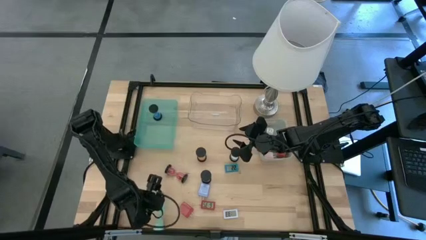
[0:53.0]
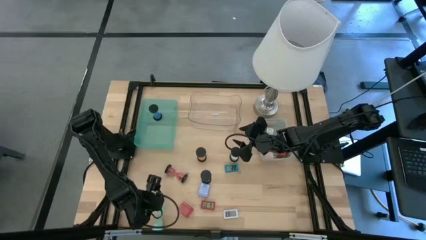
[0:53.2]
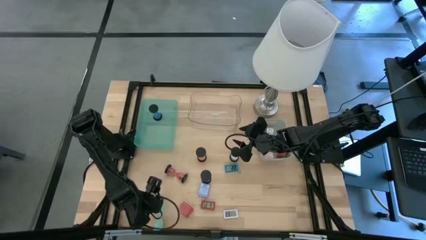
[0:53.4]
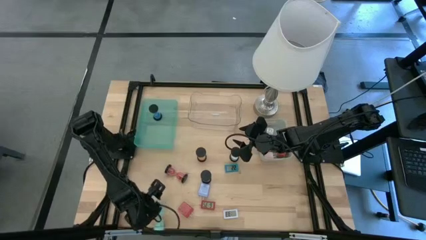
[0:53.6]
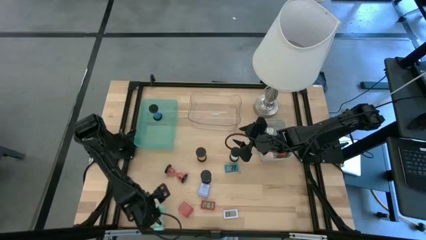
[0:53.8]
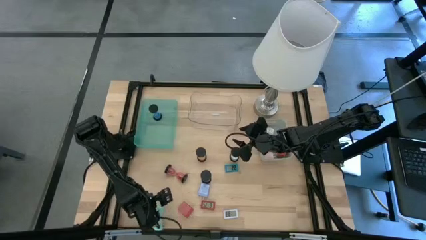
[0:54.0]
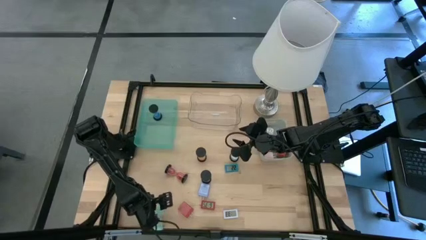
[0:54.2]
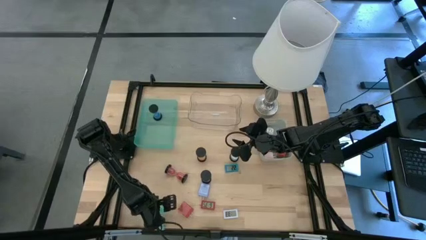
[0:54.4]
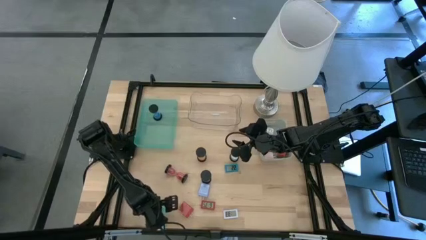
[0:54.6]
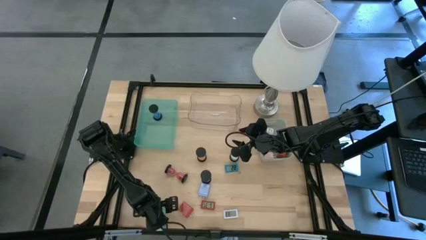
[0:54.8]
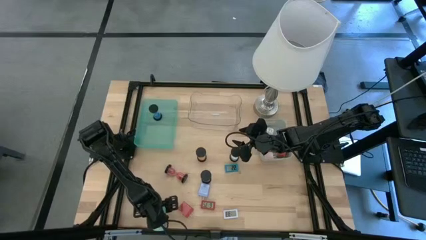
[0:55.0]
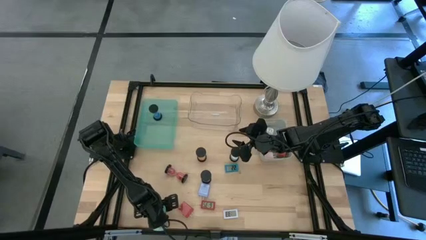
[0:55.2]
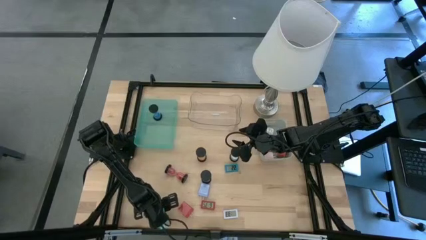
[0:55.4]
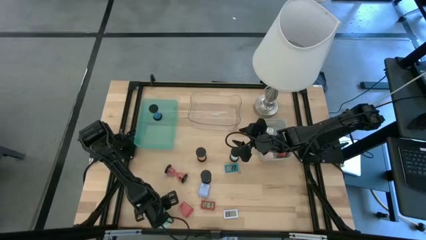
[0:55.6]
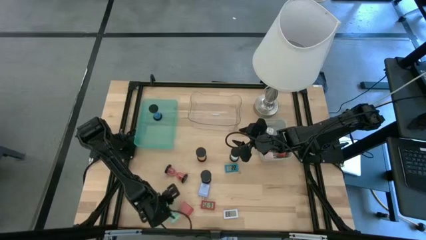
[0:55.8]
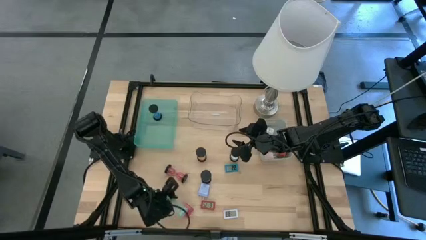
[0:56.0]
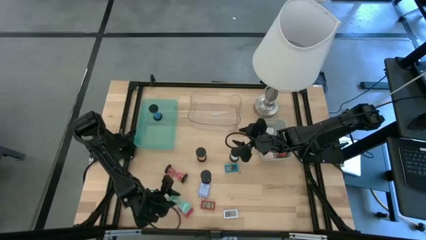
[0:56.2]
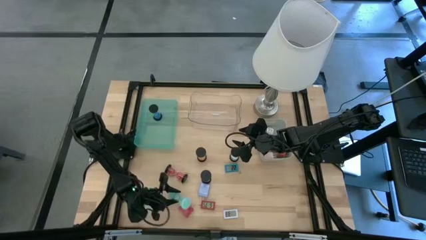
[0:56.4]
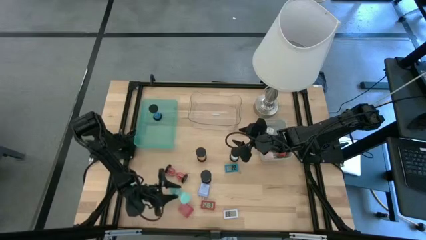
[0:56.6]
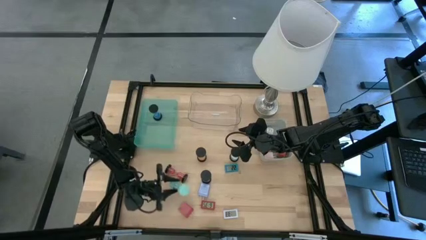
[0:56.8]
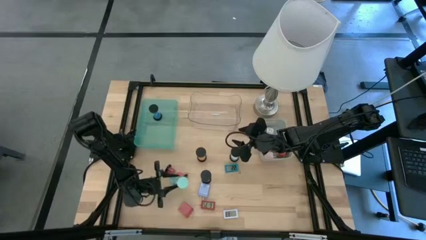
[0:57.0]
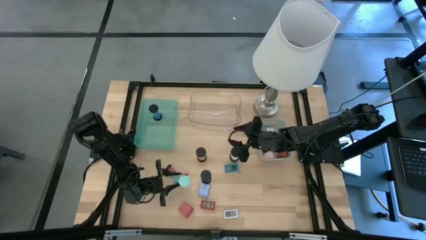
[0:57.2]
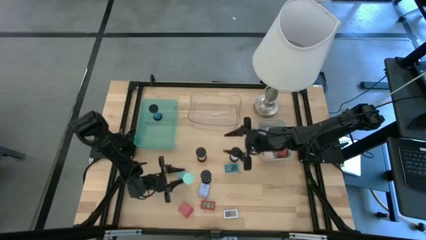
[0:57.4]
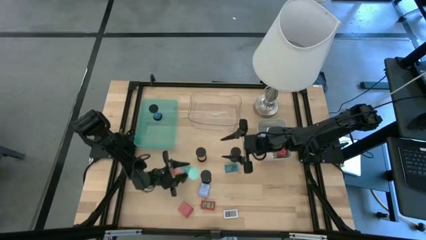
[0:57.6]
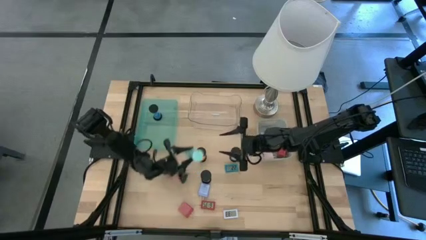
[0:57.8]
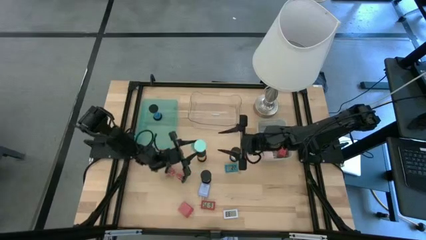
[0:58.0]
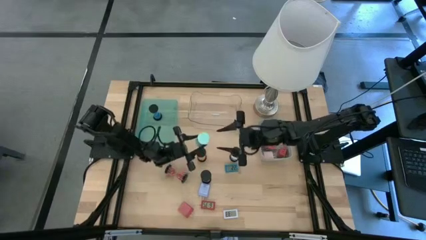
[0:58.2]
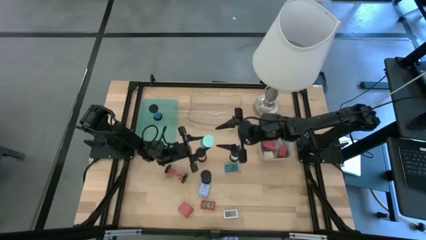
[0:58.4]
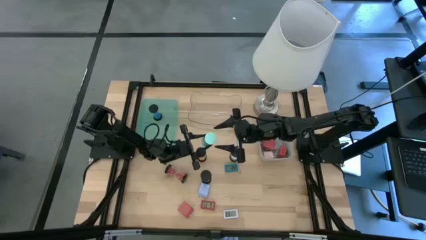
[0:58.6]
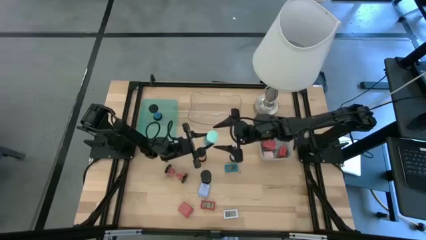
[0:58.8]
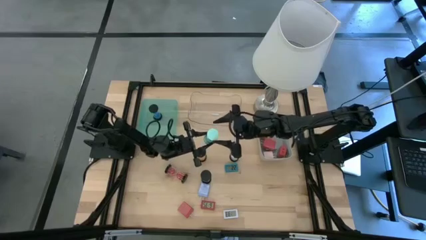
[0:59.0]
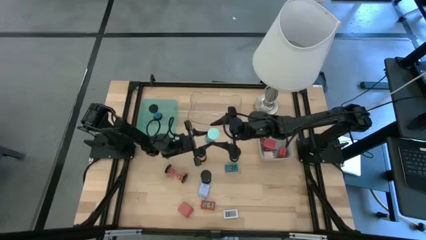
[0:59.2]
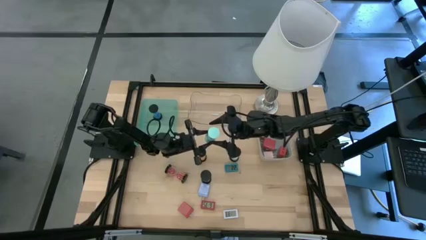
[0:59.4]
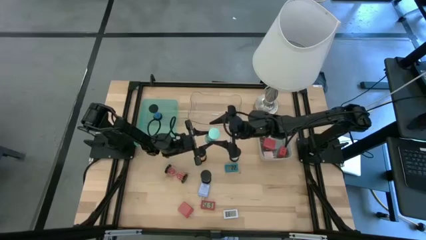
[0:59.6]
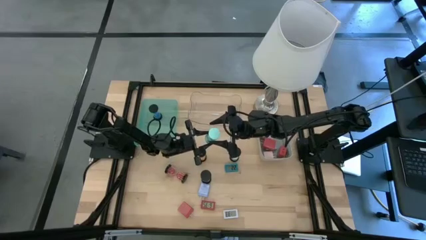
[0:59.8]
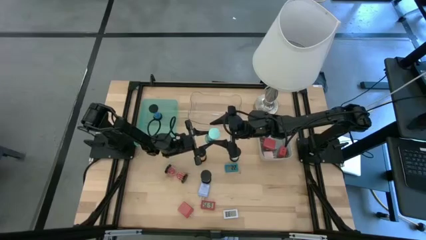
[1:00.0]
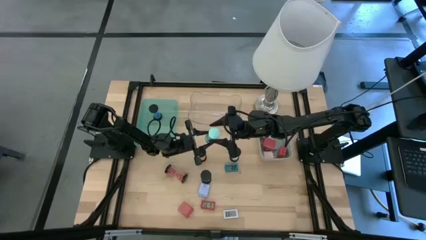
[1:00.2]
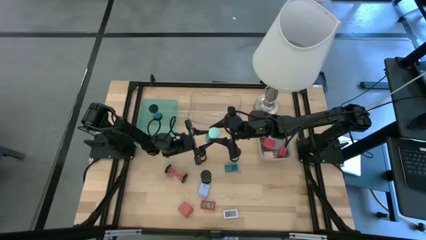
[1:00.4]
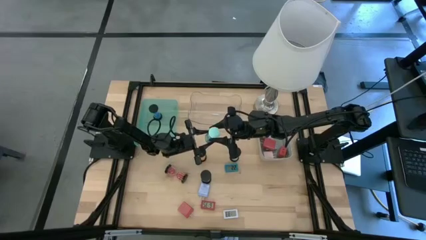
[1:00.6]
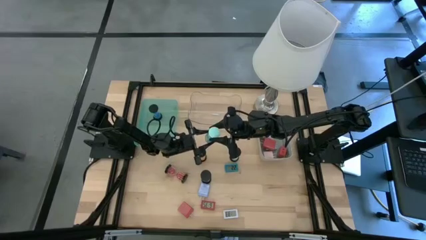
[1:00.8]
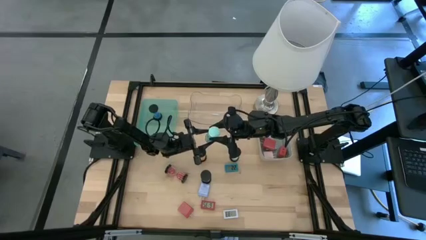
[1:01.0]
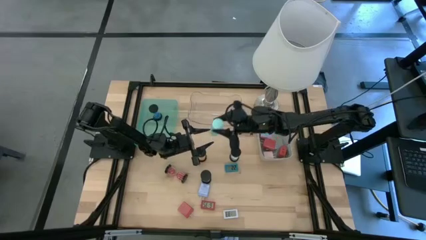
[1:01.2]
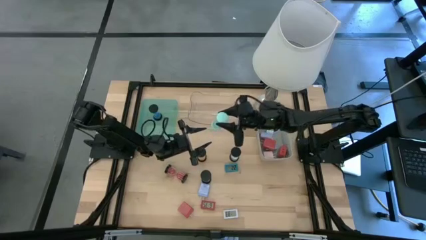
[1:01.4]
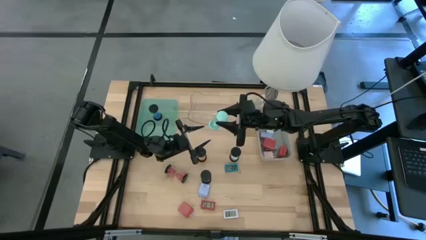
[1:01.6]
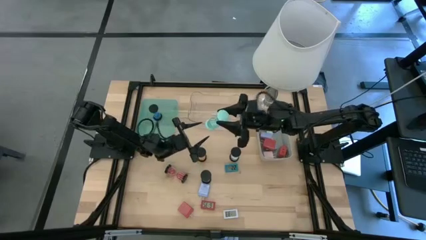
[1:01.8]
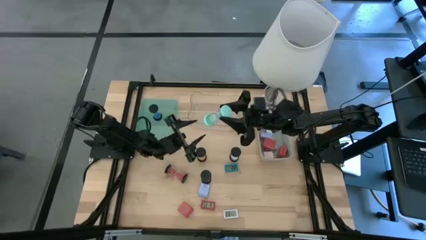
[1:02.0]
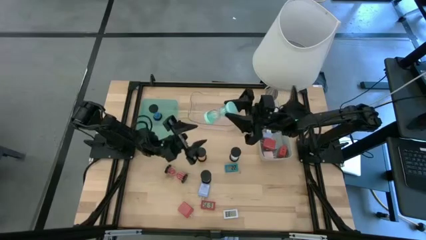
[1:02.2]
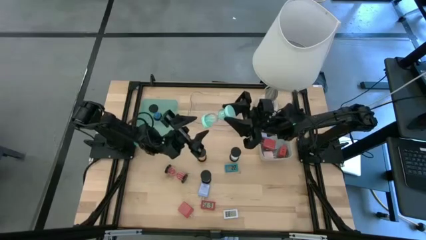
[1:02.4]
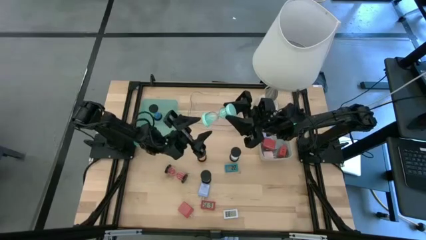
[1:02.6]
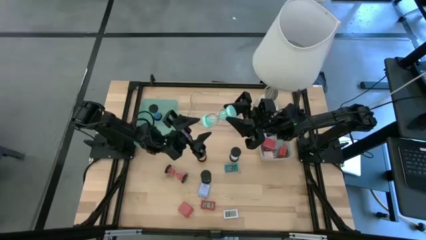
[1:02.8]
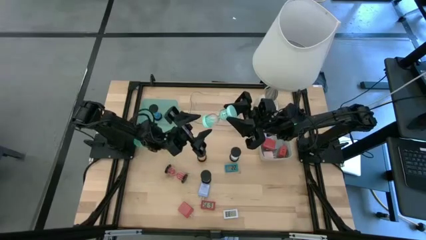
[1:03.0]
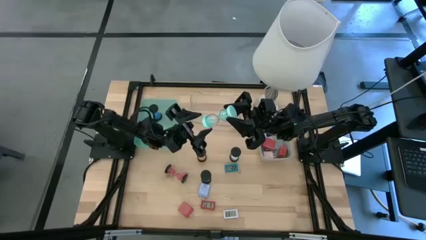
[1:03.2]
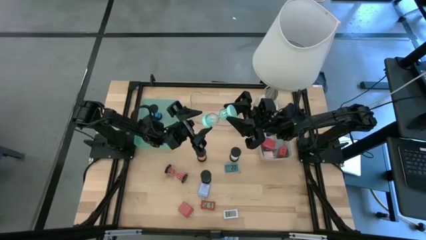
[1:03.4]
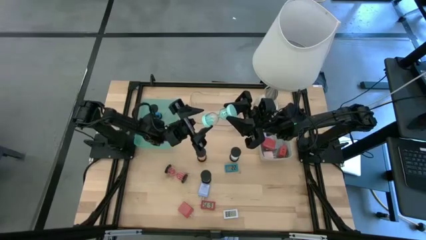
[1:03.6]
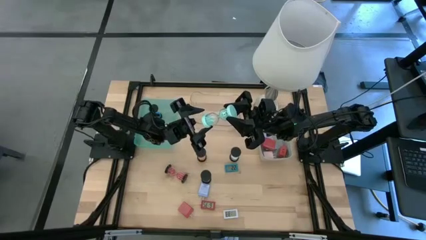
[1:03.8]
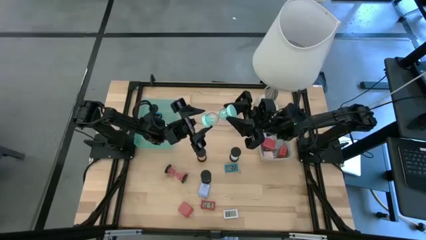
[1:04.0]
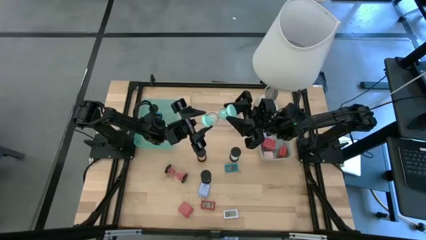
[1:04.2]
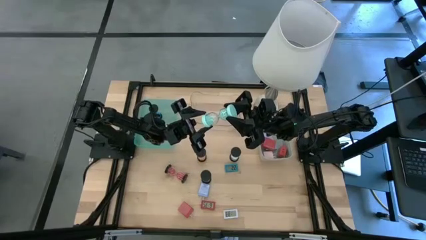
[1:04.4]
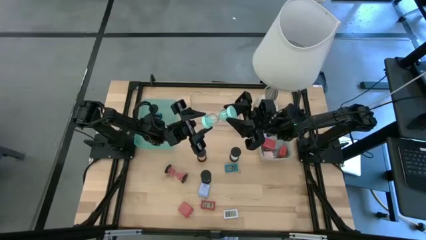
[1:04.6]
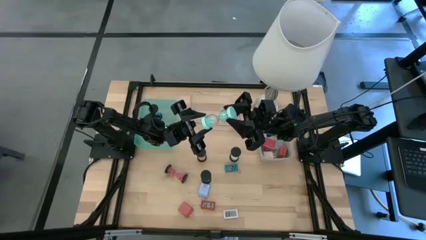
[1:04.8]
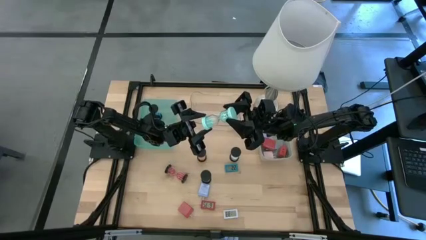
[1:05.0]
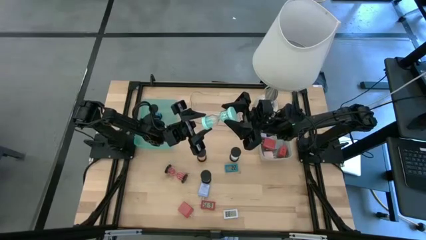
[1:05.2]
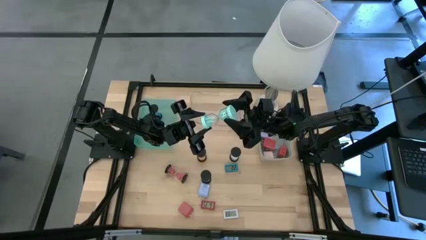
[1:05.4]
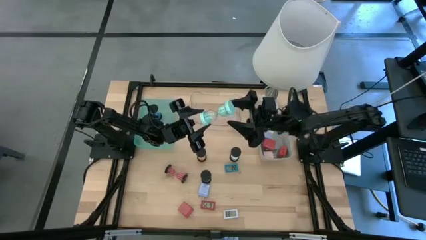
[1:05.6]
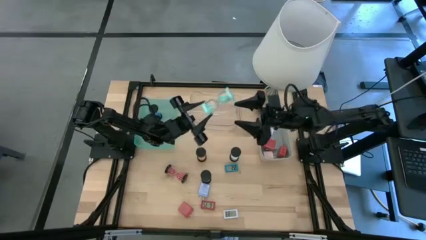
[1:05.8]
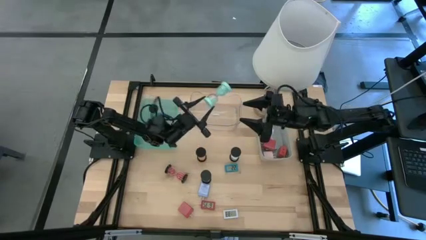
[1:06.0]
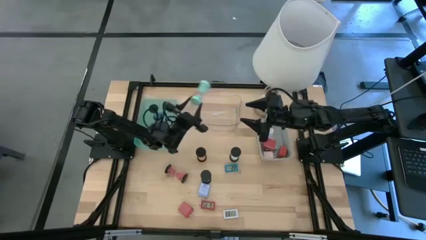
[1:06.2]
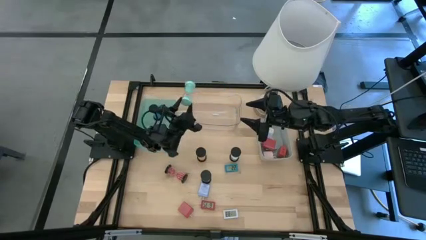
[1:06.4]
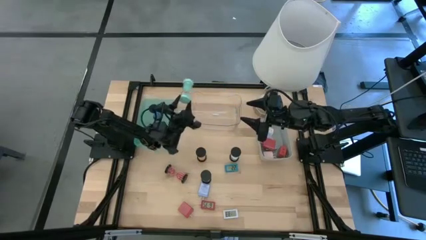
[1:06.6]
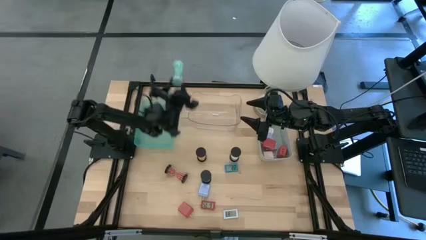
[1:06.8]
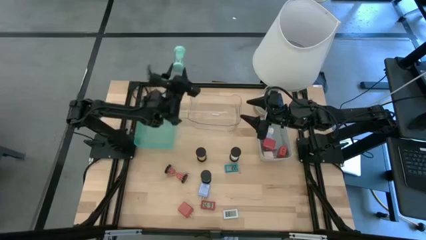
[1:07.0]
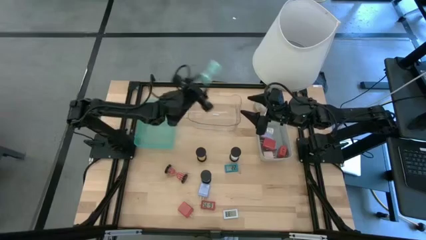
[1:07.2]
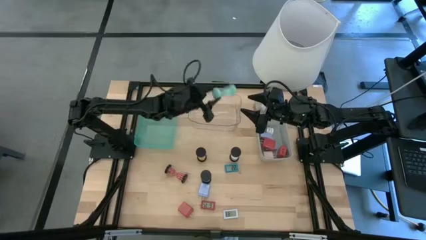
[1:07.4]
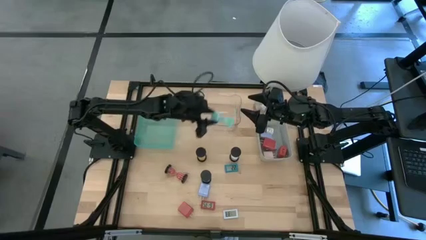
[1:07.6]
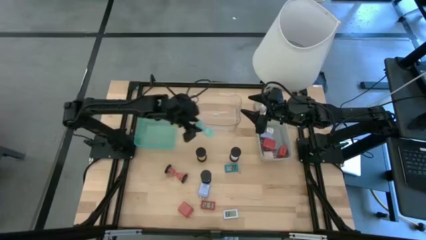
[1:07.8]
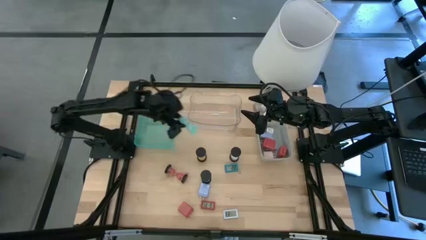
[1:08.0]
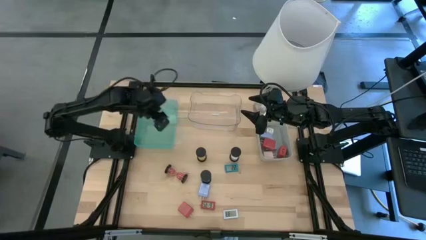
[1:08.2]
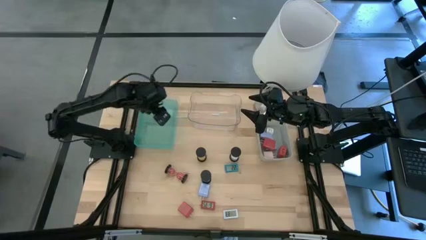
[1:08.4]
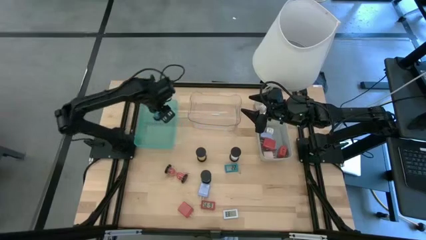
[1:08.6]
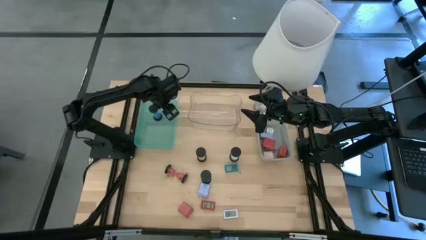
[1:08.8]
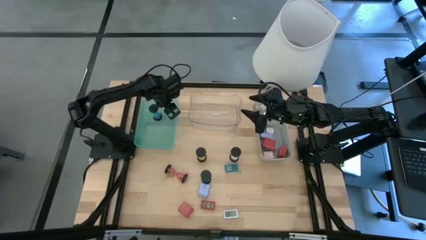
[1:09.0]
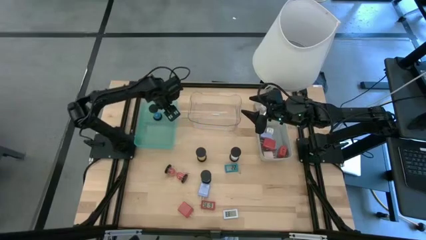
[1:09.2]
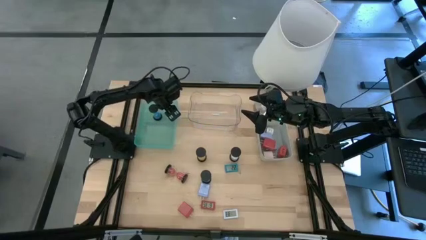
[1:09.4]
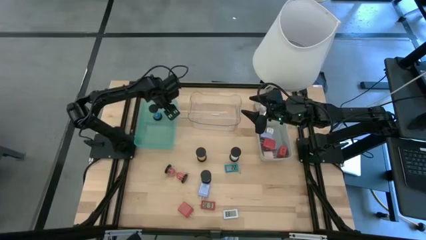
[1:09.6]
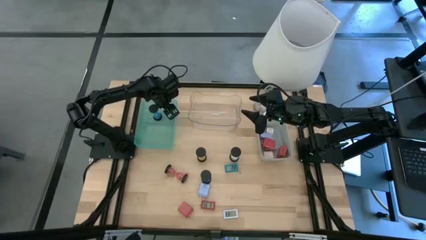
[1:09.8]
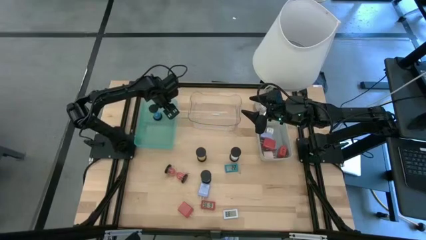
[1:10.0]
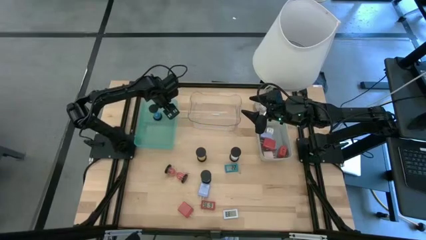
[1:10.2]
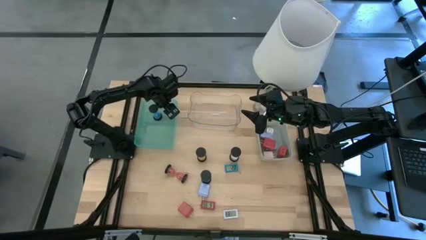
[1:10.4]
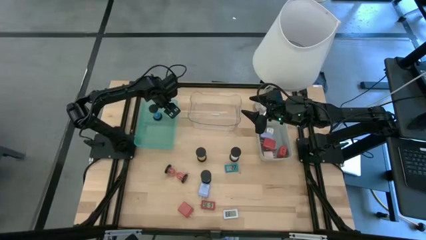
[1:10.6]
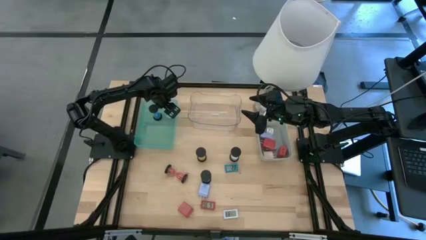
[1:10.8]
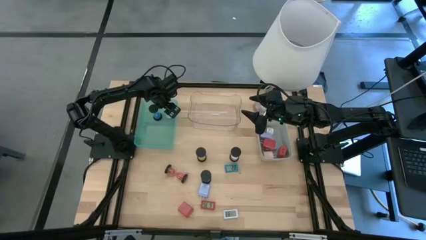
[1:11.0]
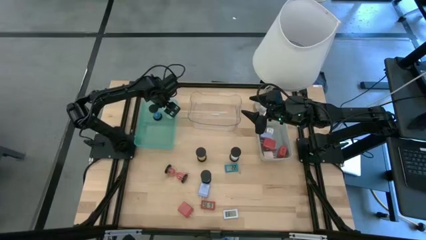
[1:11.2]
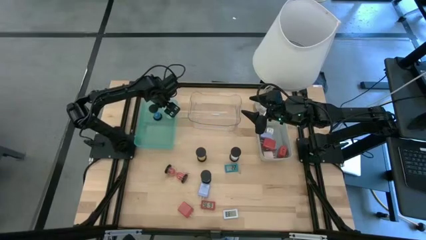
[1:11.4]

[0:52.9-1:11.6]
Task: Pick & Place Office items
Put the light blue hourglass into the green bin
